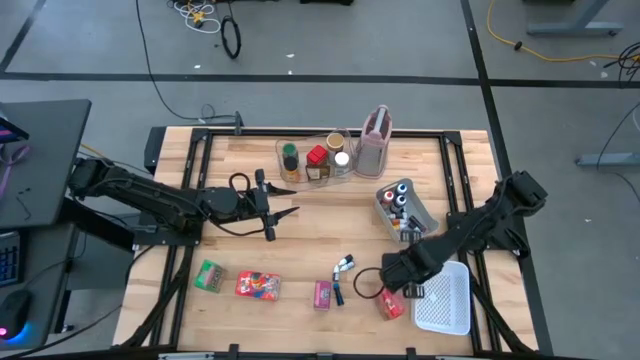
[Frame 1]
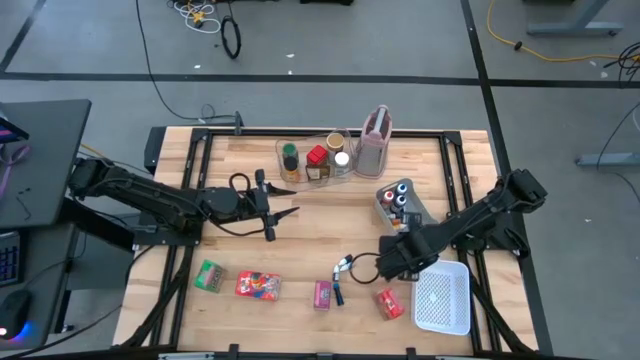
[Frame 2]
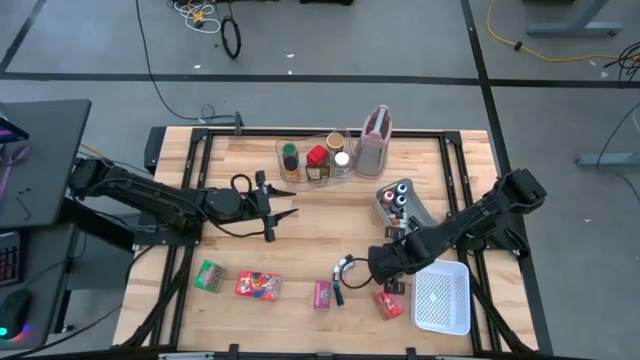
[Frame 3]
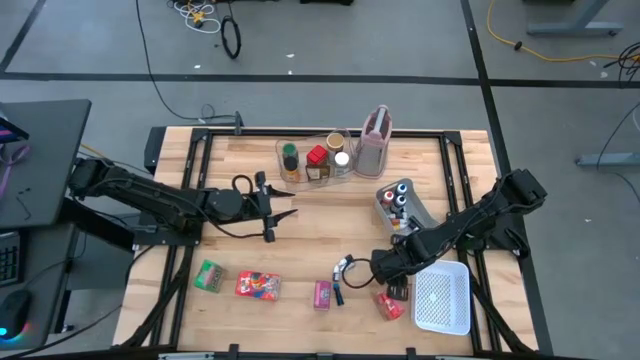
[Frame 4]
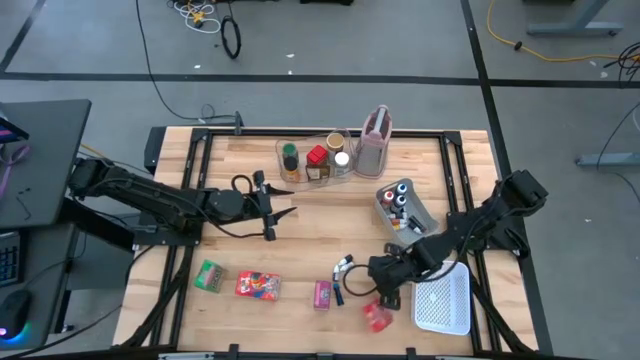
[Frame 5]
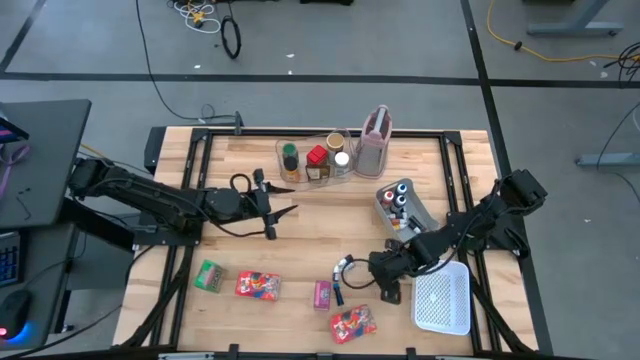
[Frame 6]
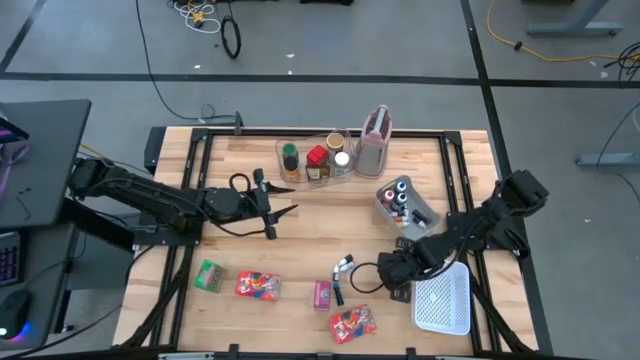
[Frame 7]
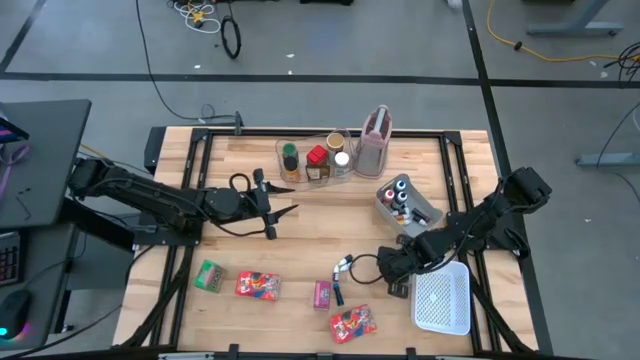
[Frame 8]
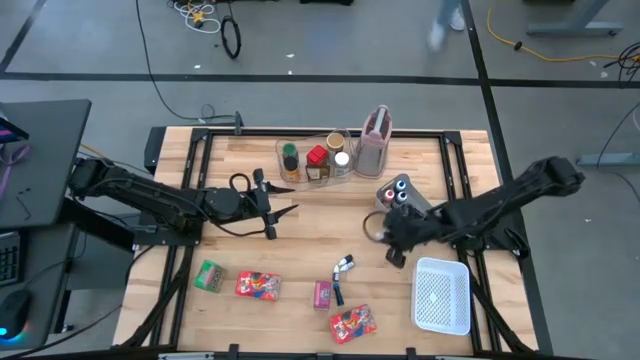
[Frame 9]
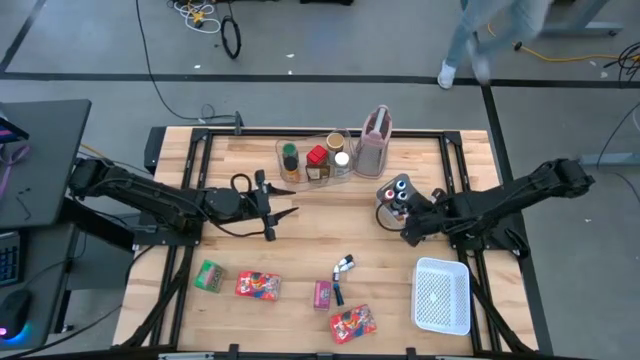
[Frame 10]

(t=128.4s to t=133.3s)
Task: Pick & Place Kitchen Items
Put the small red food coloring bottle into the gray bin

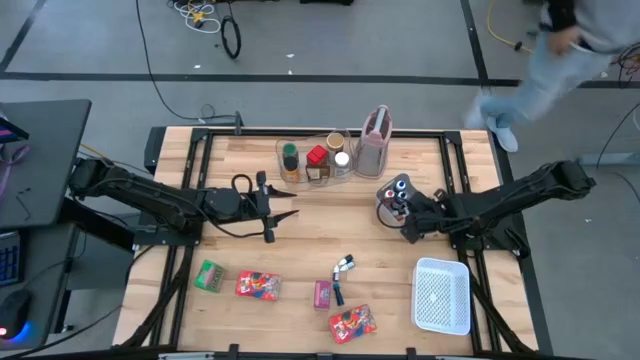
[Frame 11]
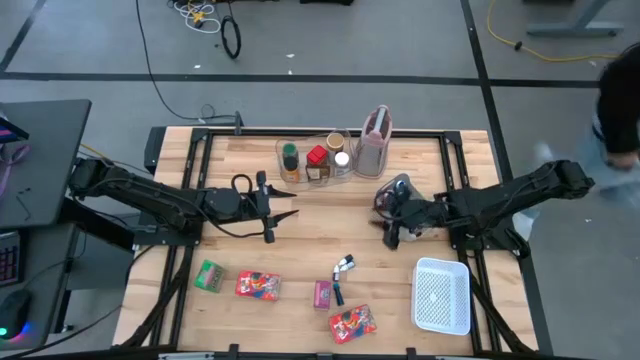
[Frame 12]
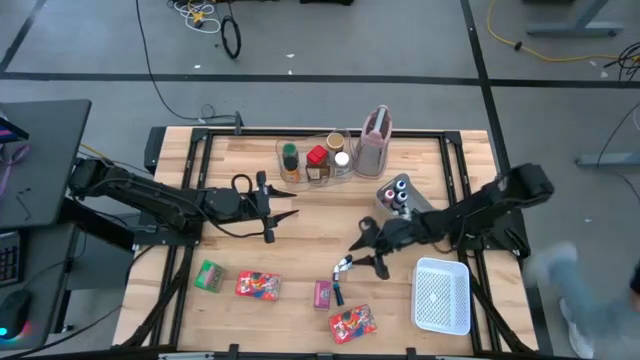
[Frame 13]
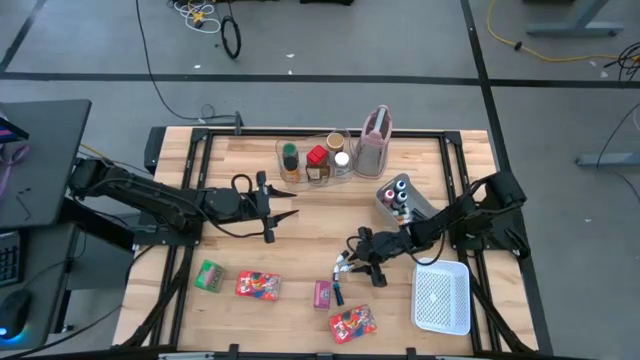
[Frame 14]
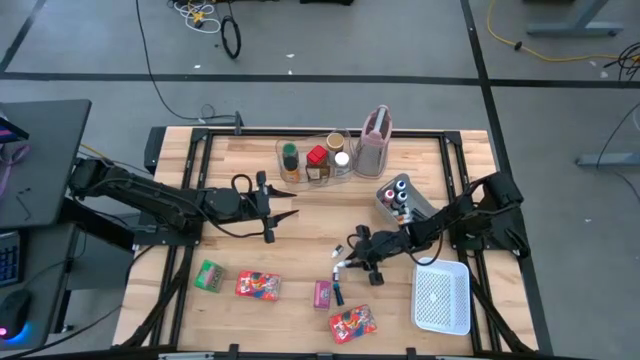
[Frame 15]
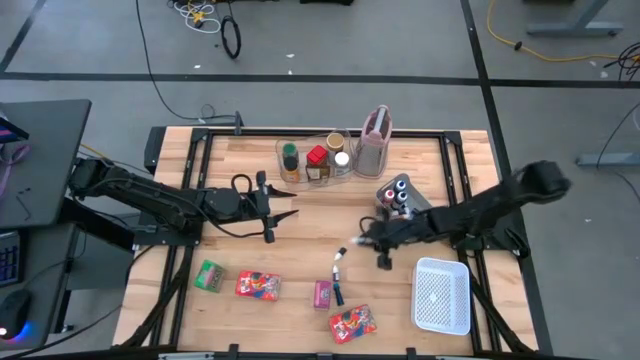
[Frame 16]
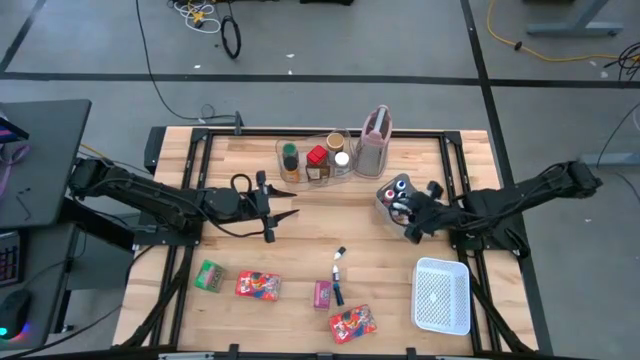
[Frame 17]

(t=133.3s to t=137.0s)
Put the small green food coloring bottle into the gray bin

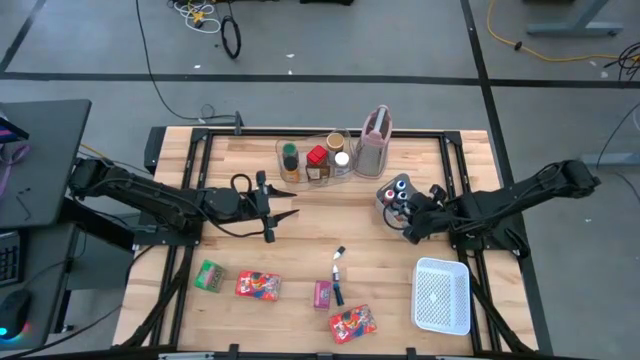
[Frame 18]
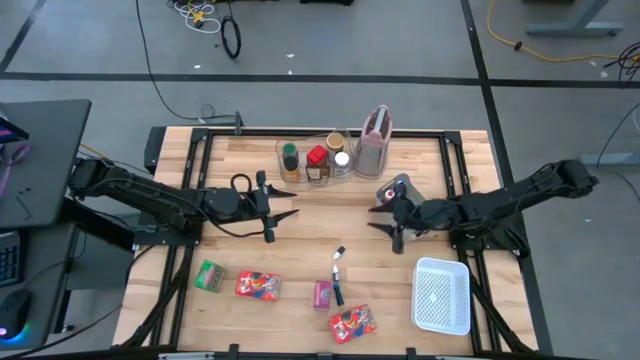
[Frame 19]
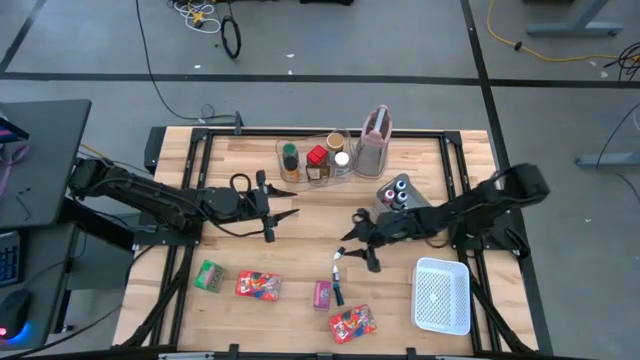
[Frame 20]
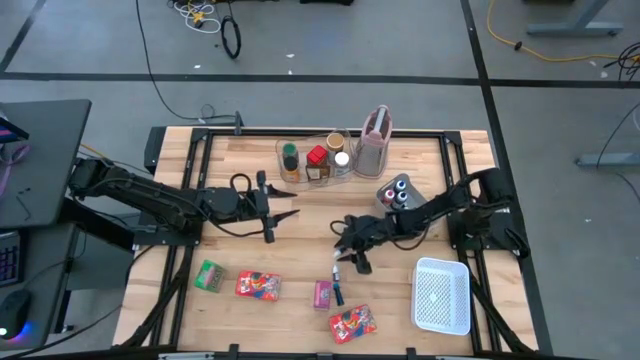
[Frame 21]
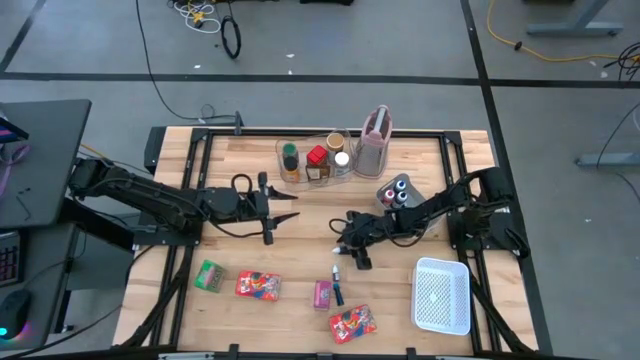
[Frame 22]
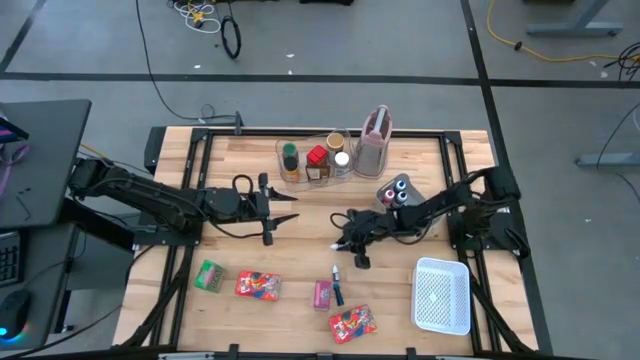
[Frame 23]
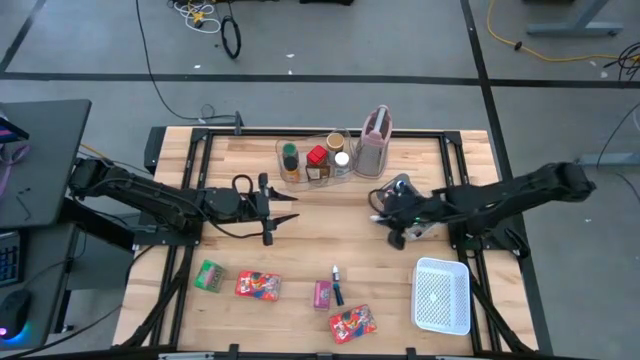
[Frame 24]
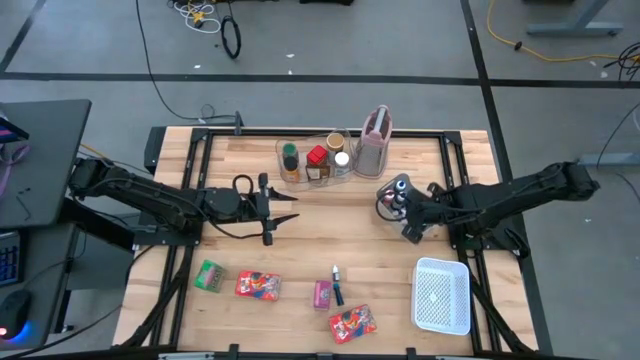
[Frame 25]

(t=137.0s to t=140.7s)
Put the small black food coloring bottle into the gray bin

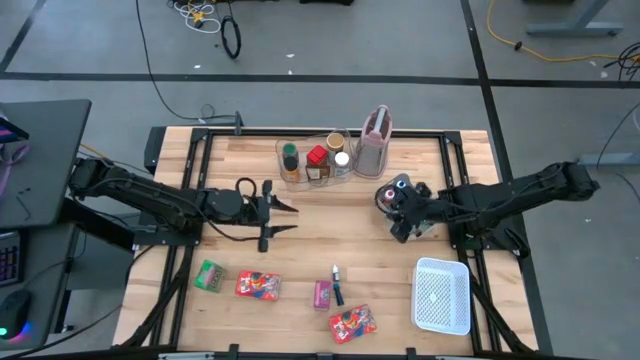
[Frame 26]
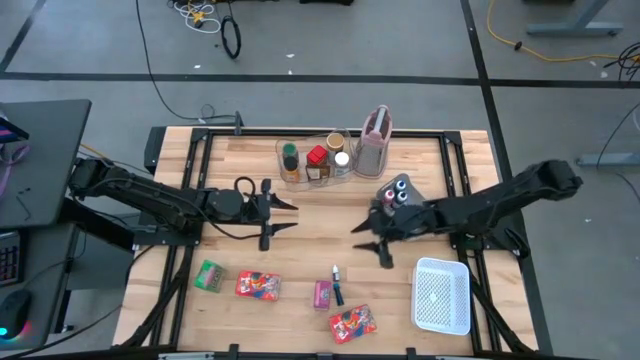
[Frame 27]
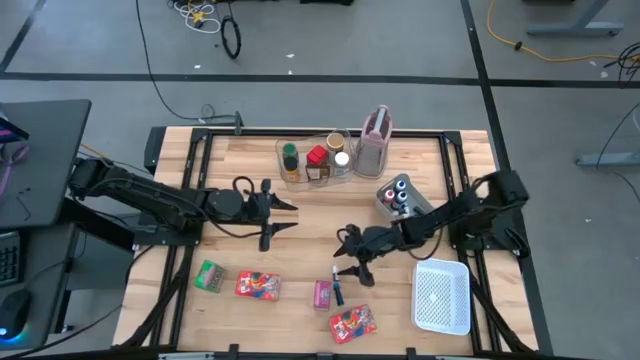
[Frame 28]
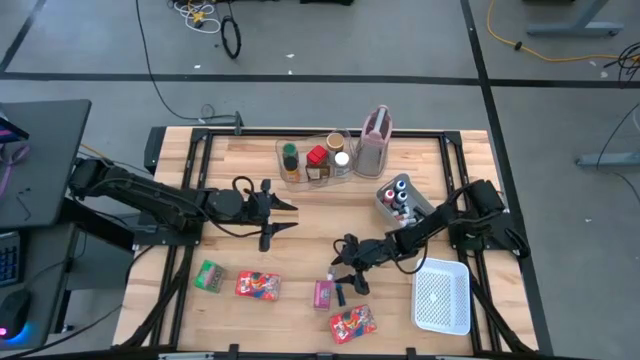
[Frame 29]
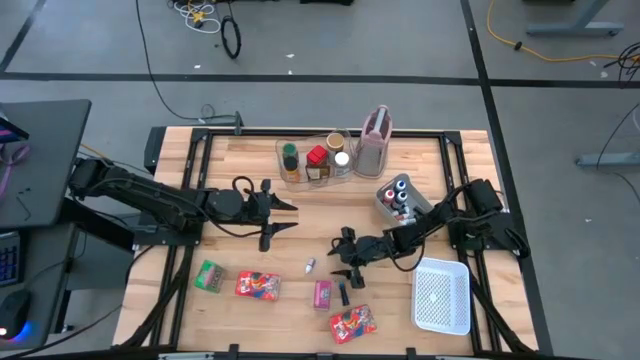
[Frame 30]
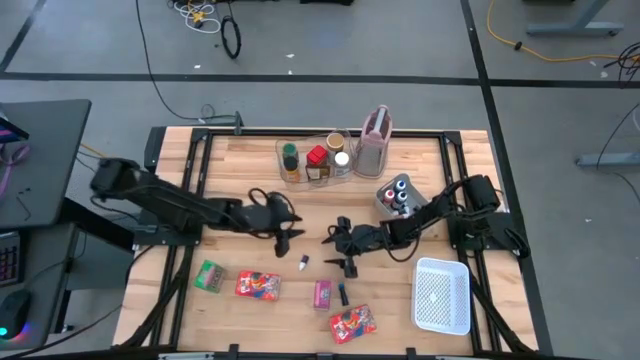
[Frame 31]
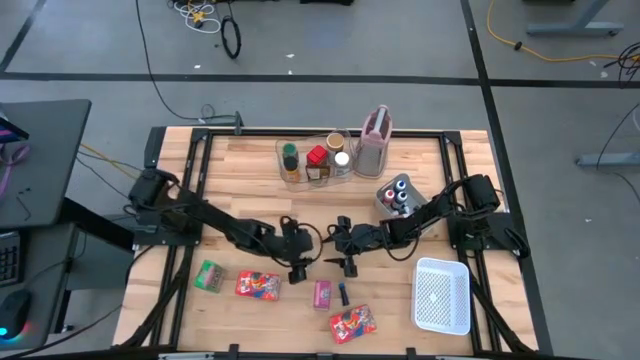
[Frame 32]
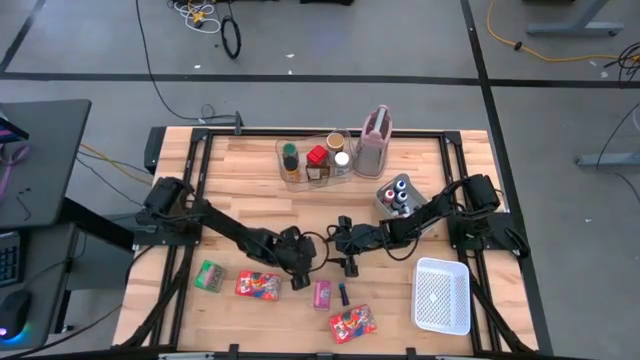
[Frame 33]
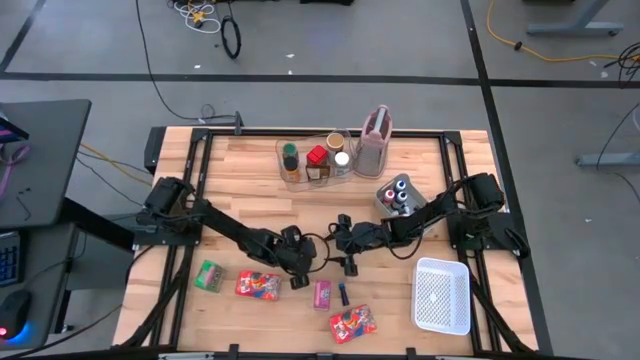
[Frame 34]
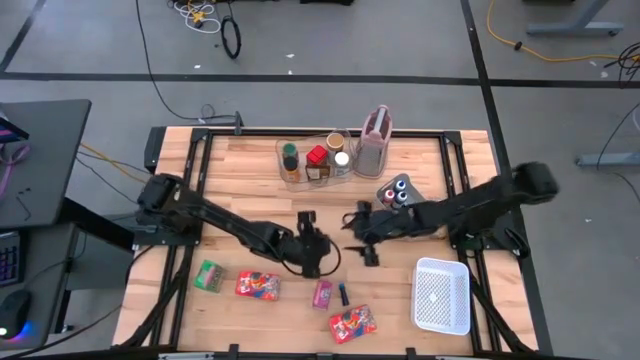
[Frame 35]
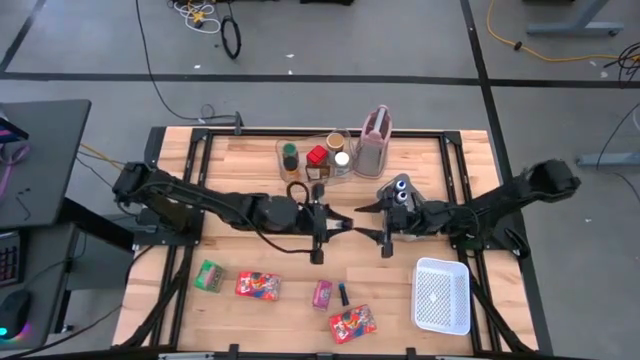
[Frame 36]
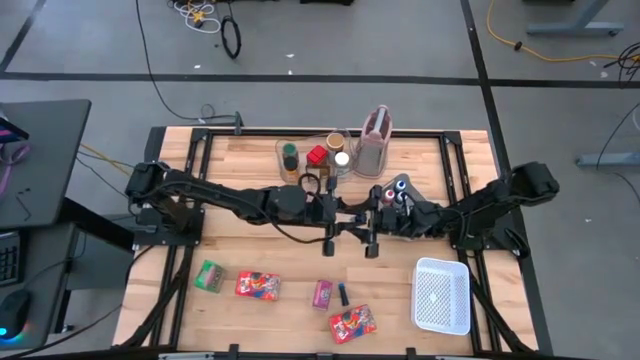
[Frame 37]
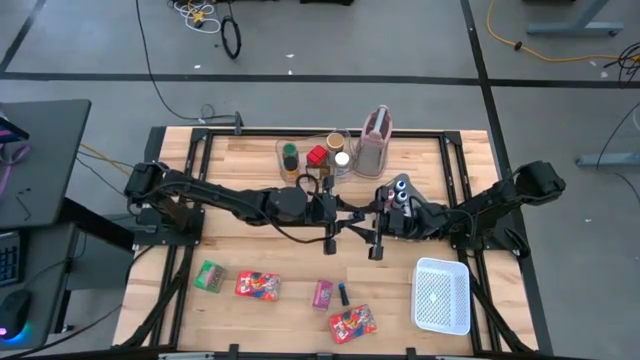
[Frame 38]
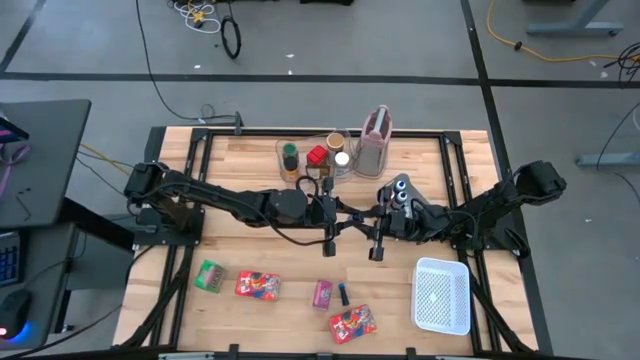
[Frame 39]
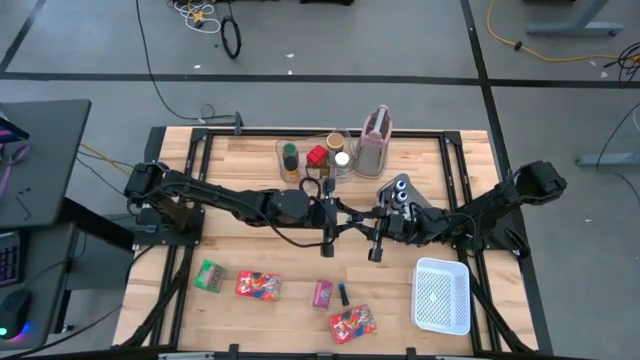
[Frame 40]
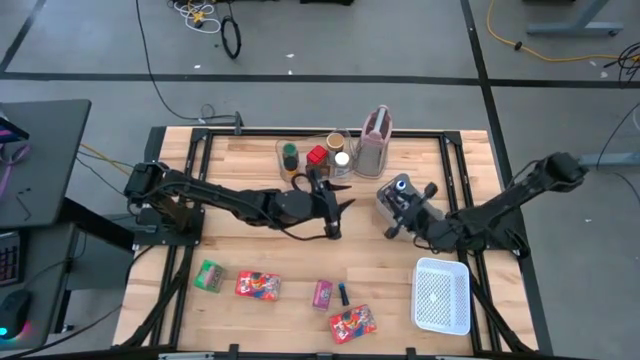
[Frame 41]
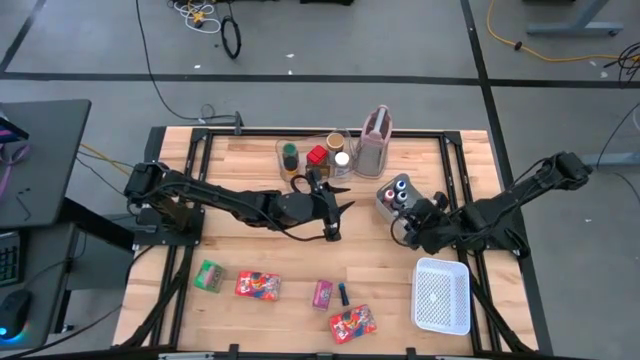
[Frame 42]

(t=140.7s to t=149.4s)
Put the small purple food coloring bottle into the gray bin
